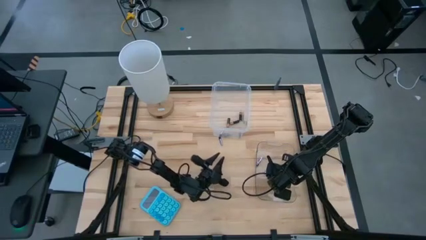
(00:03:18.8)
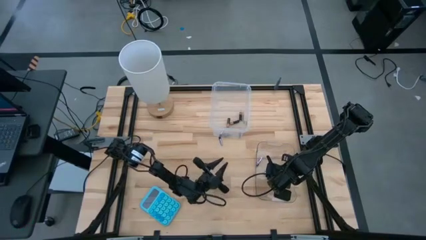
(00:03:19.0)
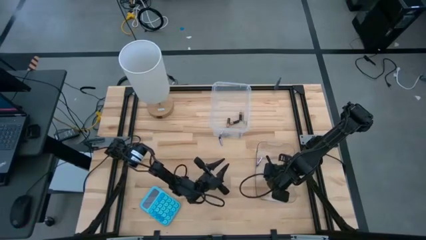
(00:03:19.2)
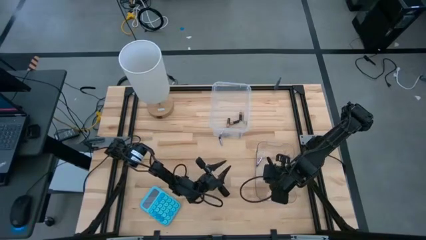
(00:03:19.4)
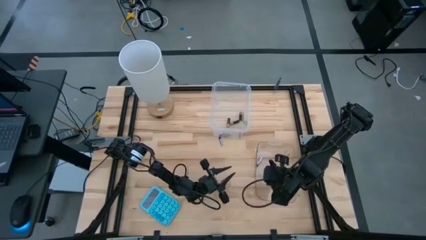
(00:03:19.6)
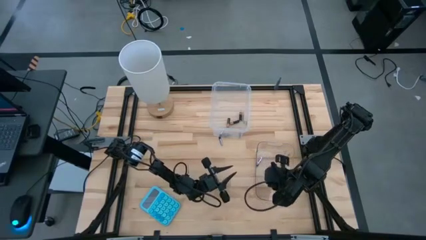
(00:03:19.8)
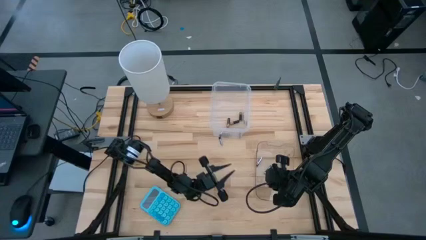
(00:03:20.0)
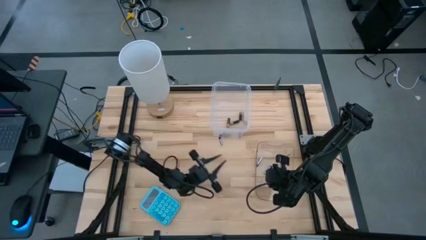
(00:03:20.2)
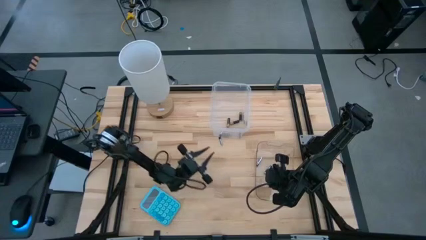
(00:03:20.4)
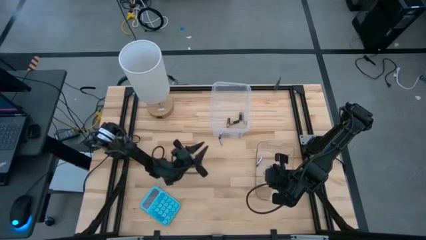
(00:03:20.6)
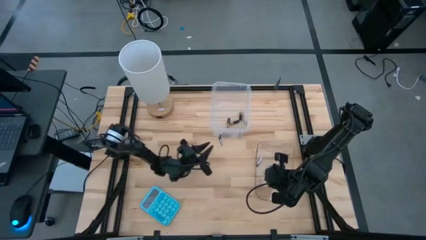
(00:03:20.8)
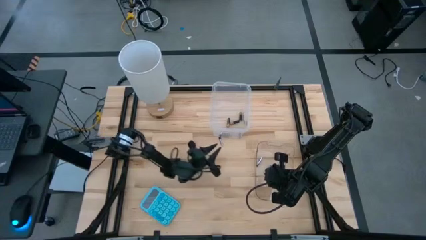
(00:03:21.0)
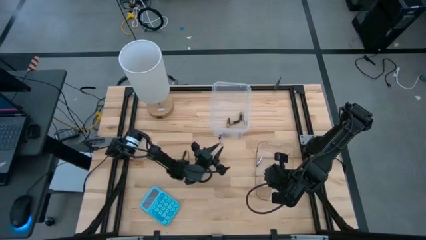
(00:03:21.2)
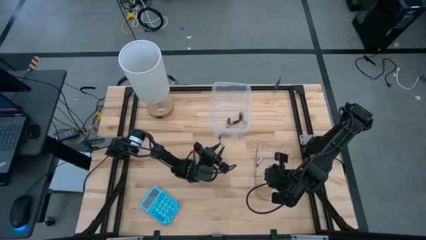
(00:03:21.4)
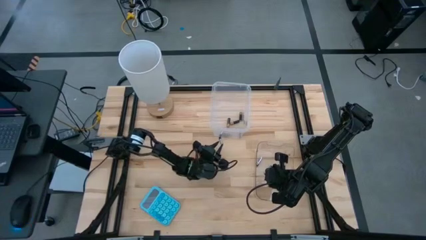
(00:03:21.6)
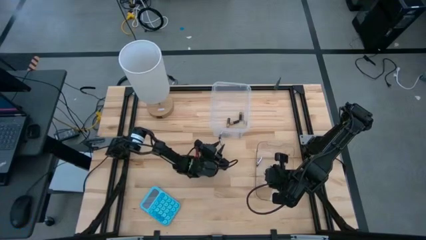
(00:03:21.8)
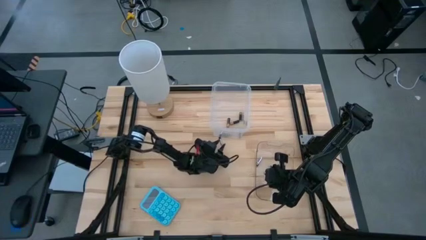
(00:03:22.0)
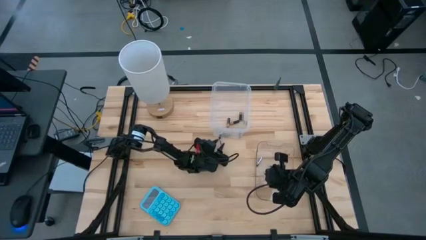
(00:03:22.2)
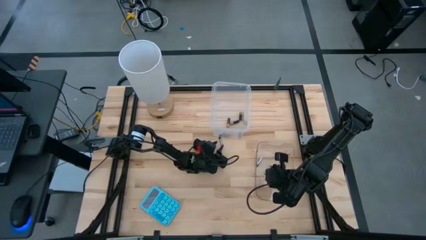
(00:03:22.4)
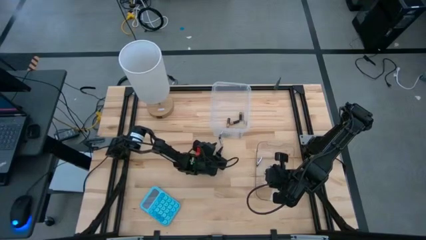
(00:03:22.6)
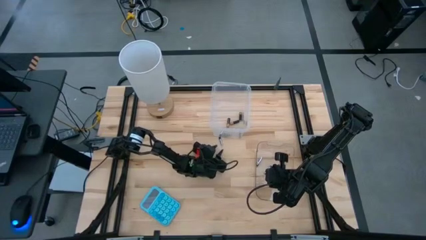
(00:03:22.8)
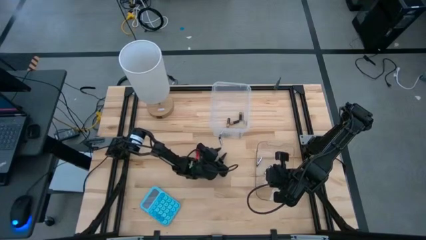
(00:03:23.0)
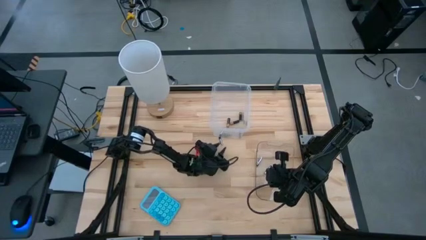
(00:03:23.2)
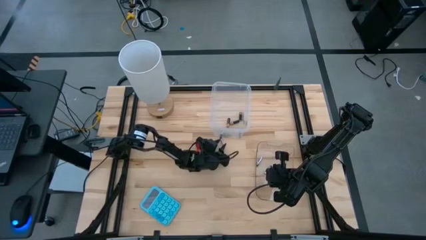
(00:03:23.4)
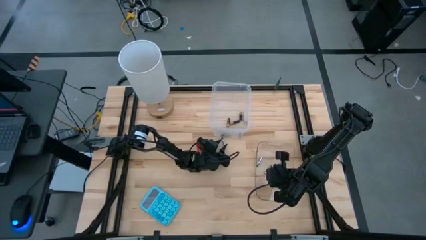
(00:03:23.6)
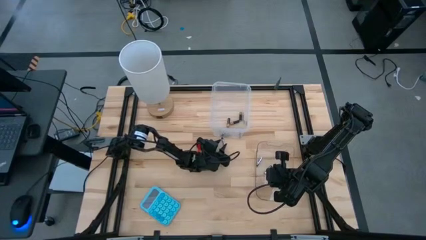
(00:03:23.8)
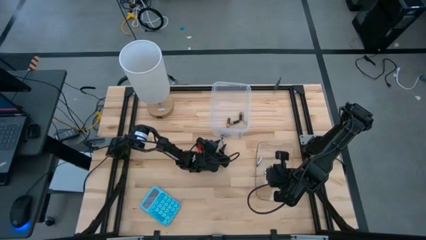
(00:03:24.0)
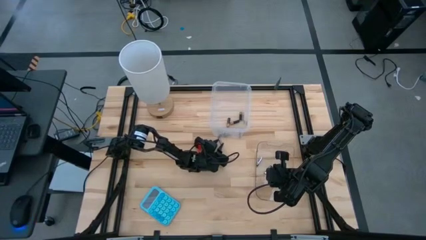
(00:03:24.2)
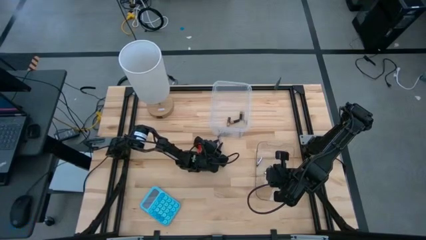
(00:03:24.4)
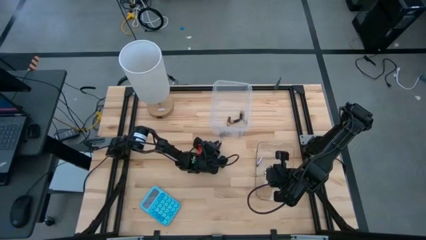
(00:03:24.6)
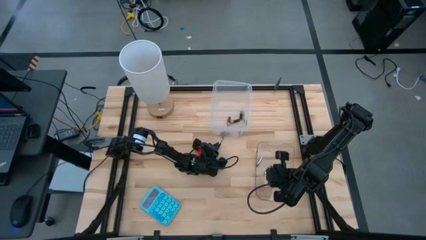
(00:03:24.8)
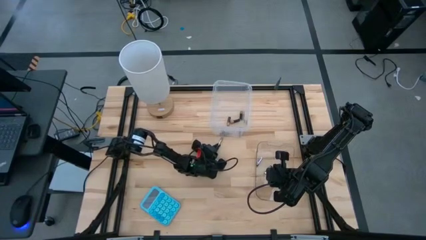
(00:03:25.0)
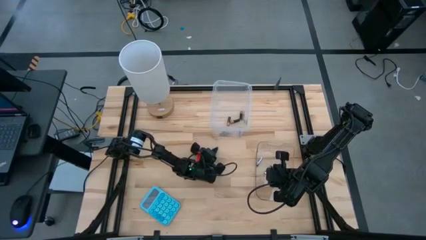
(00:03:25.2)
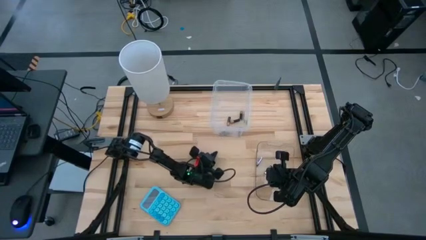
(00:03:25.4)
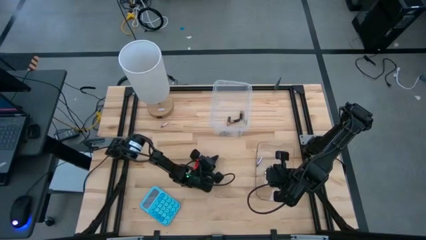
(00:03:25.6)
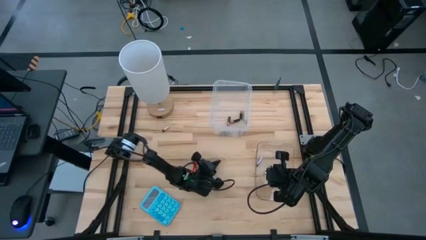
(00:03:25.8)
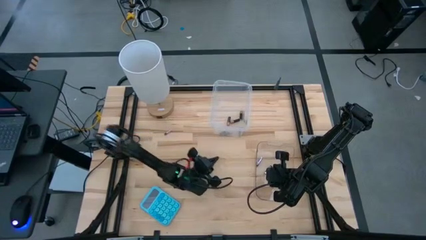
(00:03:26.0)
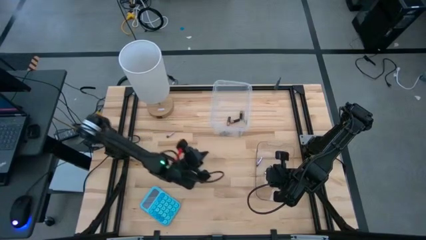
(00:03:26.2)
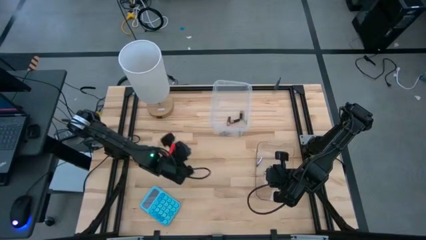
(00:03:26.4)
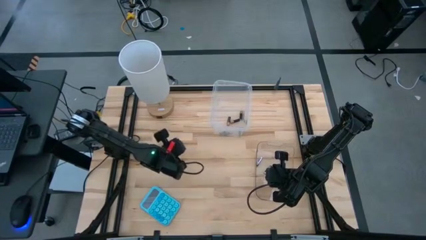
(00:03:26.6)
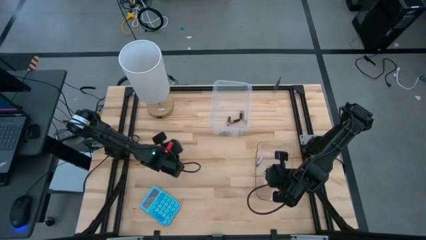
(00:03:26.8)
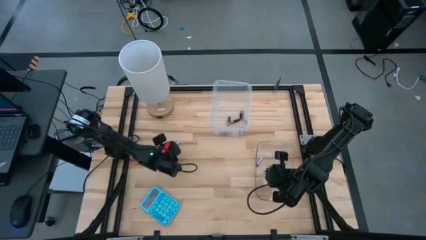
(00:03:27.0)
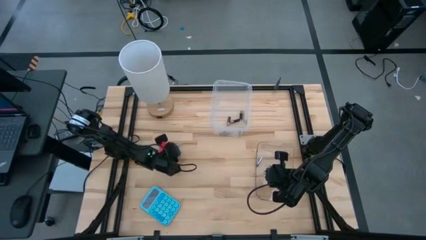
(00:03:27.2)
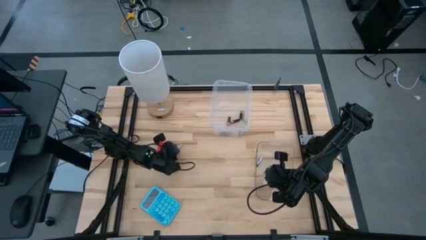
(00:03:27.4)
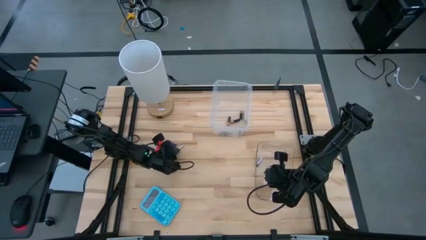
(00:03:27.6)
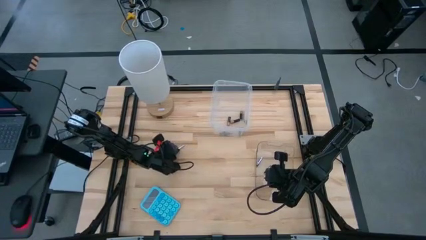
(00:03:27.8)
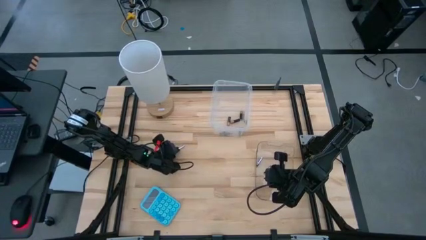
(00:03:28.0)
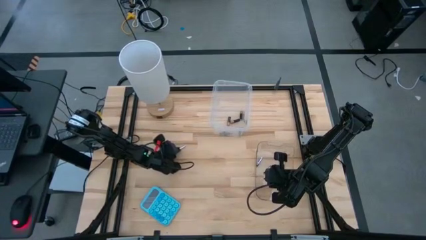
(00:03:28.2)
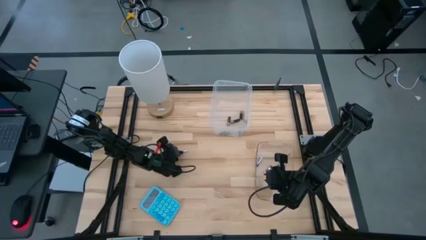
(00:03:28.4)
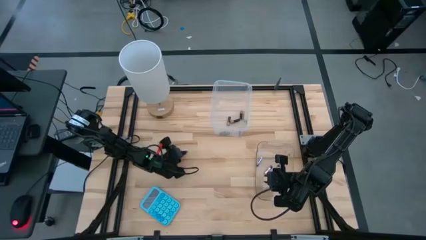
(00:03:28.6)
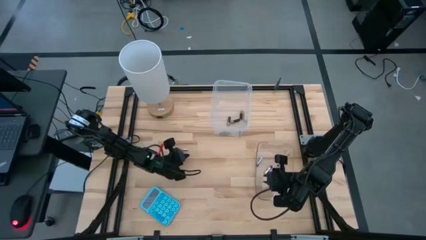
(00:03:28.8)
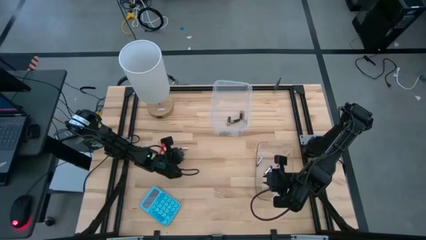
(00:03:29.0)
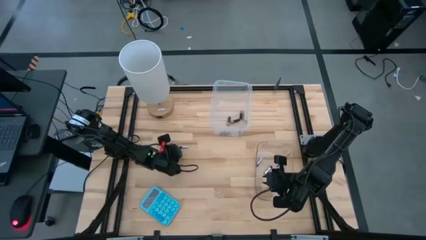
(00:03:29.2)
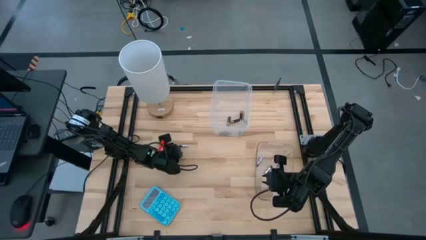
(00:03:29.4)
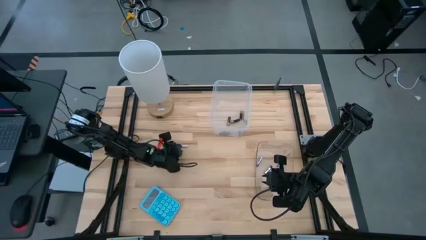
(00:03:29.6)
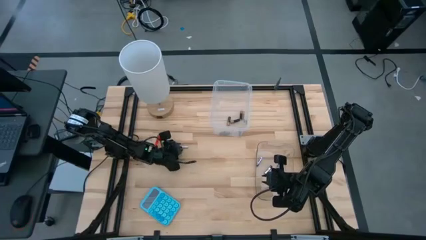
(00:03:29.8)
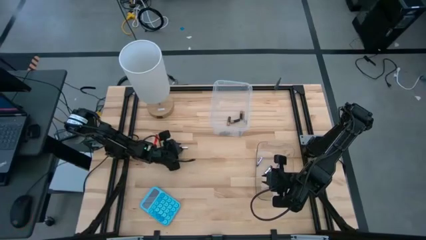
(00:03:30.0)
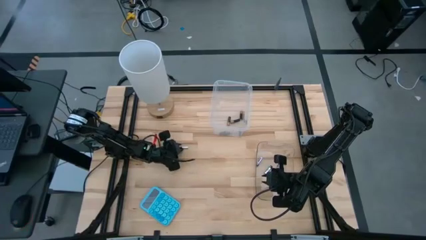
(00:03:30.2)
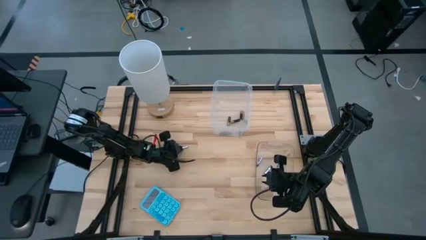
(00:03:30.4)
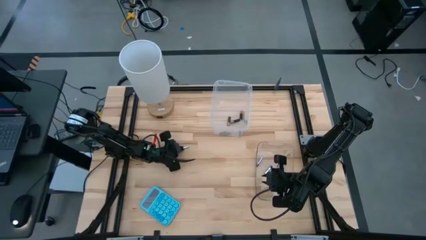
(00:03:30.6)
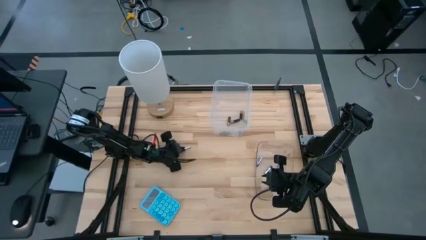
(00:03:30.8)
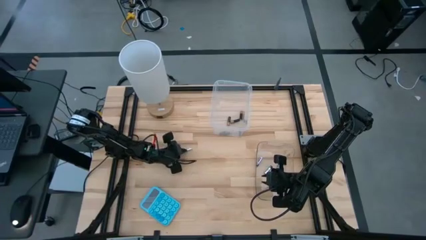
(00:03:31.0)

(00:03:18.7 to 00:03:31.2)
Task: Sort batteries
Put the silver battery into the bottom transparent bin

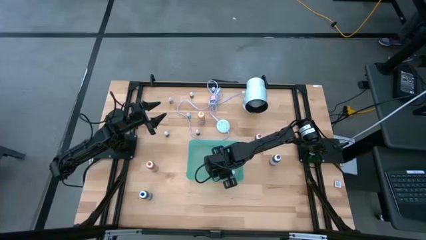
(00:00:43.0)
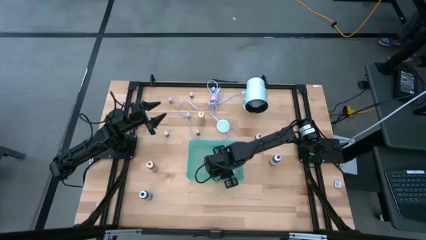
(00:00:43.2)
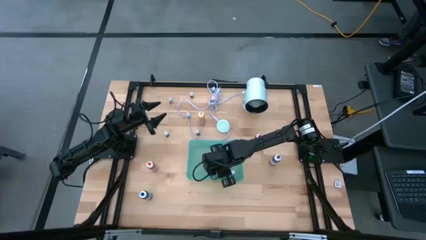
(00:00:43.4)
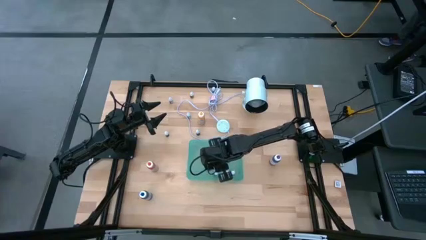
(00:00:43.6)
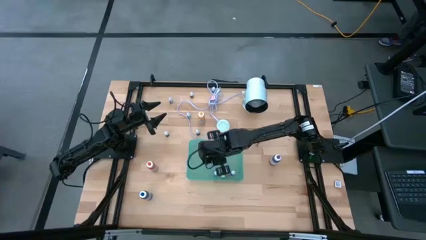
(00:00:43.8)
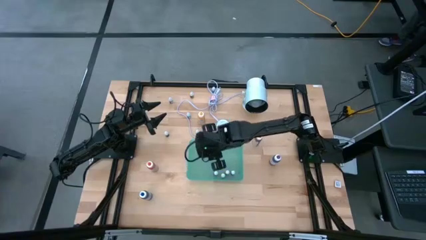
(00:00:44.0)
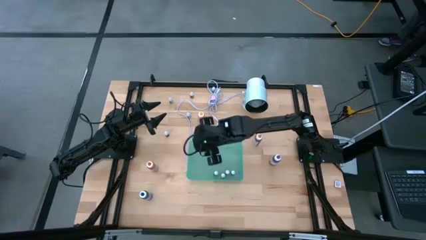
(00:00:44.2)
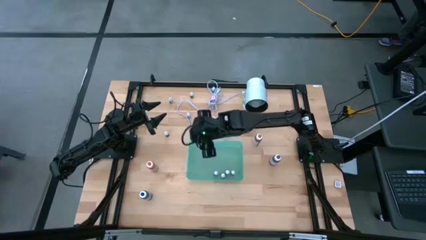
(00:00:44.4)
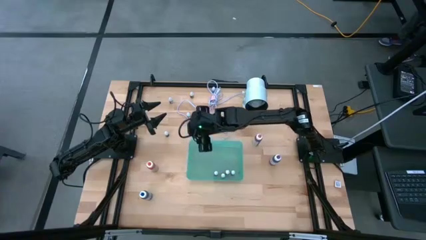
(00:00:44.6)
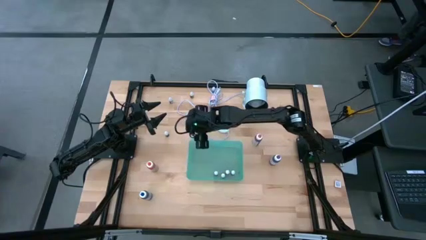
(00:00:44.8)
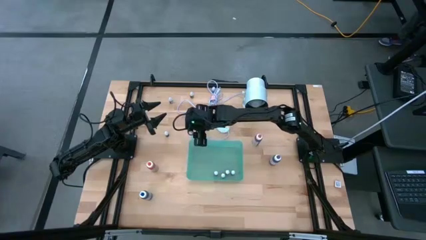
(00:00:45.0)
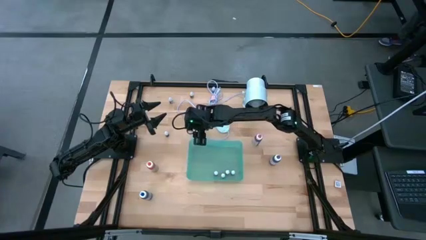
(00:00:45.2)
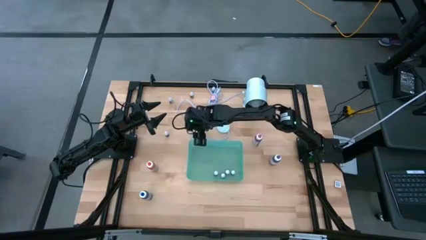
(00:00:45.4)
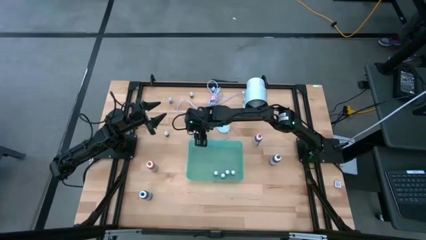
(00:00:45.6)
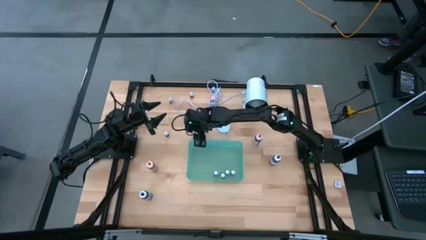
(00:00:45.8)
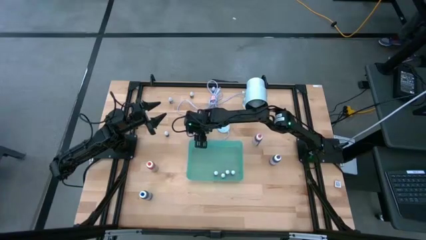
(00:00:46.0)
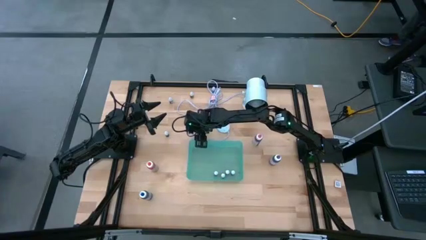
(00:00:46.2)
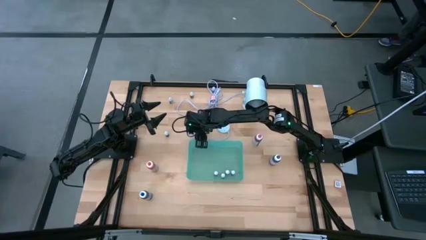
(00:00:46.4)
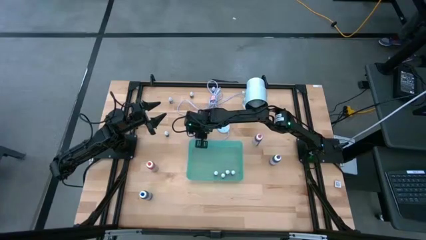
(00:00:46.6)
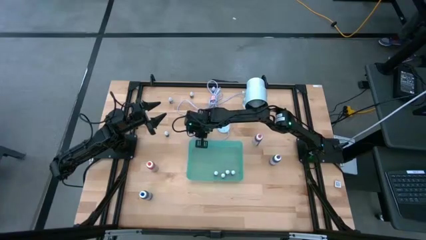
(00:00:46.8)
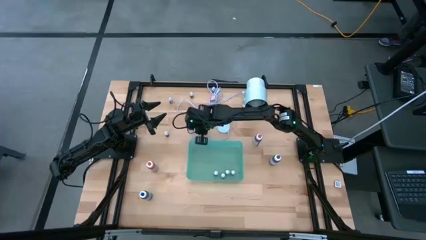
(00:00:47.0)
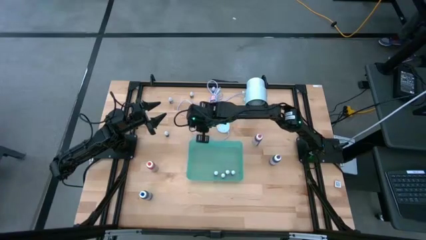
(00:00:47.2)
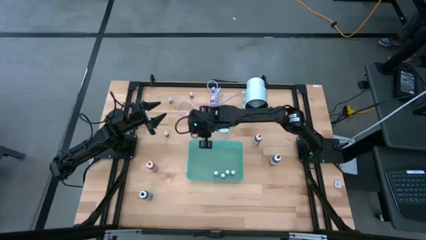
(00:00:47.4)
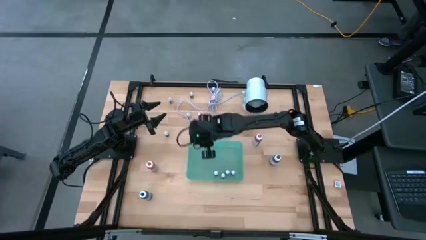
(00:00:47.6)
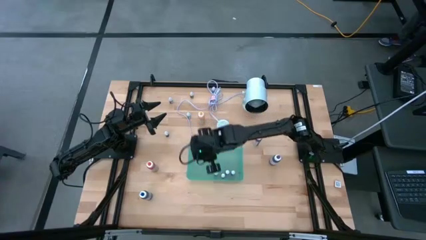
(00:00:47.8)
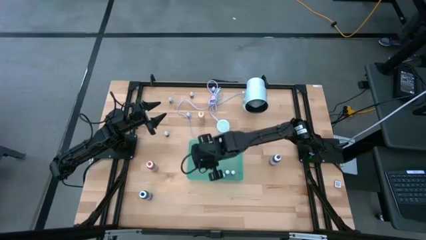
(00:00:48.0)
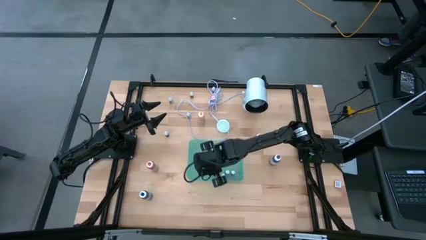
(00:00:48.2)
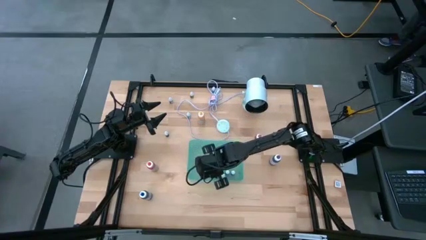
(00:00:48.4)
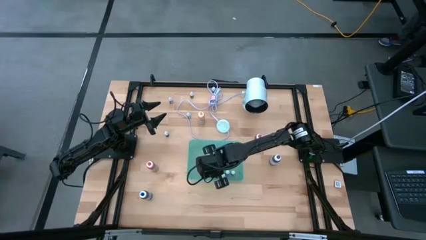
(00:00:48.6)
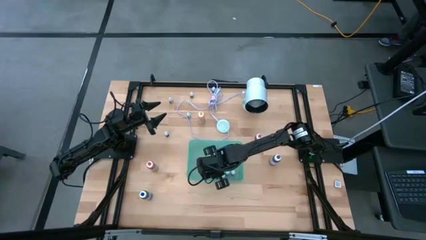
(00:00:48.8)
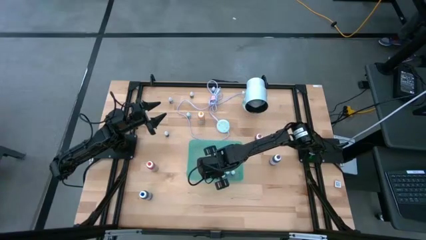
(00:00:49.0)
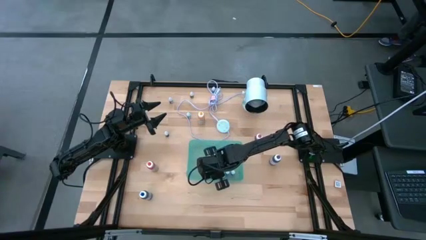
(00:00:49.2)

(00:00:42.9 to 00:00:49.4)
Task: Pick & Place food coloring
Put the small purple food coloring bottle into the bin
